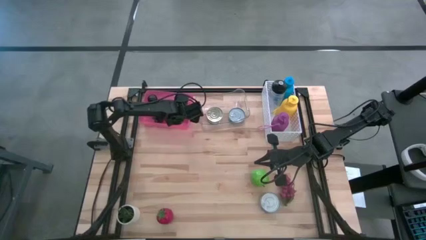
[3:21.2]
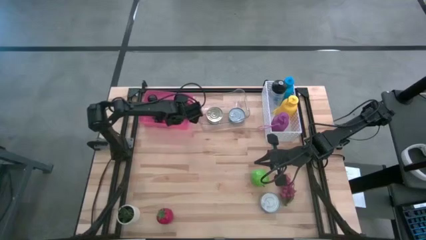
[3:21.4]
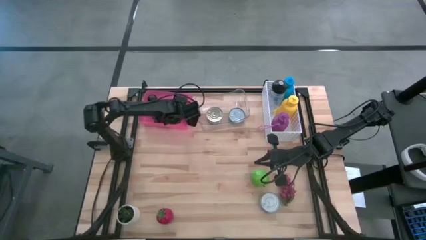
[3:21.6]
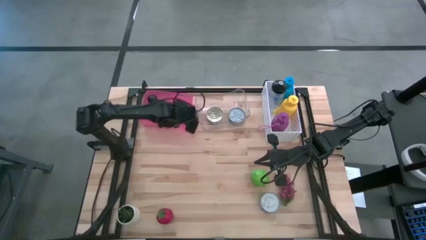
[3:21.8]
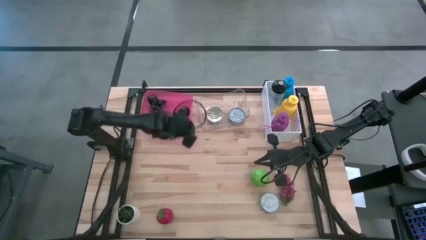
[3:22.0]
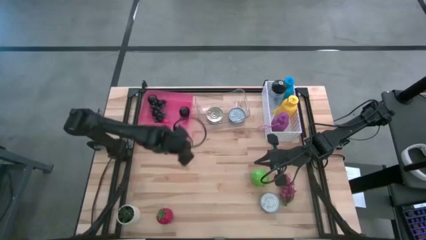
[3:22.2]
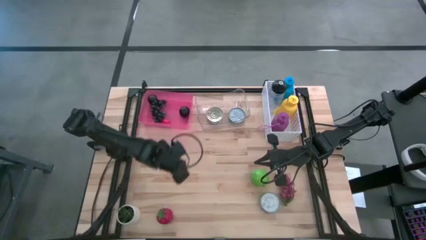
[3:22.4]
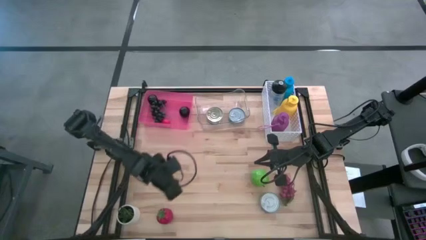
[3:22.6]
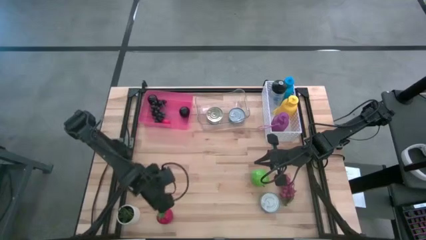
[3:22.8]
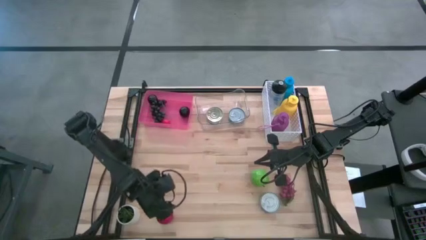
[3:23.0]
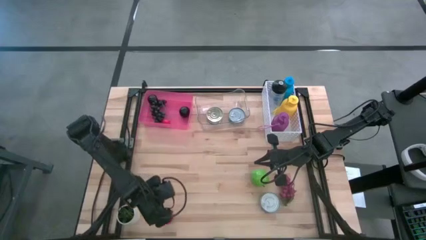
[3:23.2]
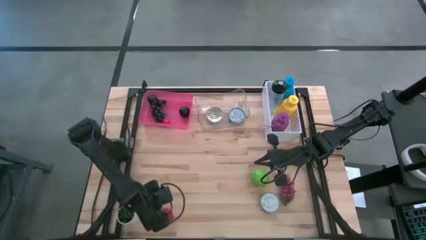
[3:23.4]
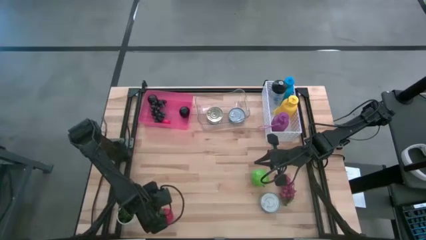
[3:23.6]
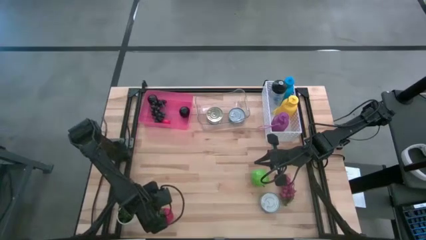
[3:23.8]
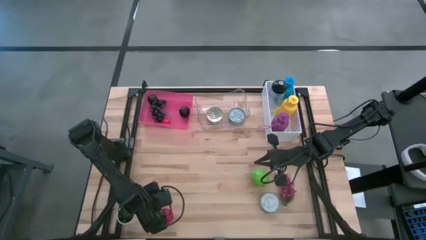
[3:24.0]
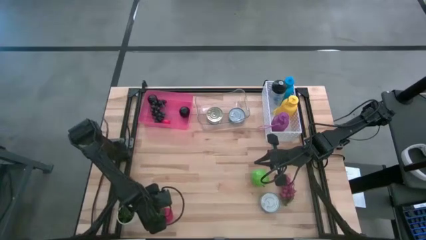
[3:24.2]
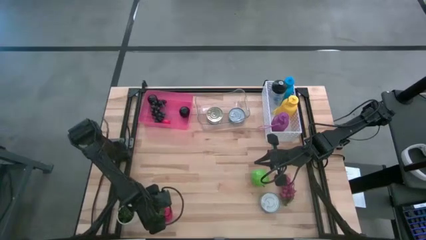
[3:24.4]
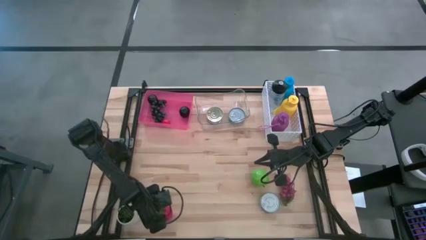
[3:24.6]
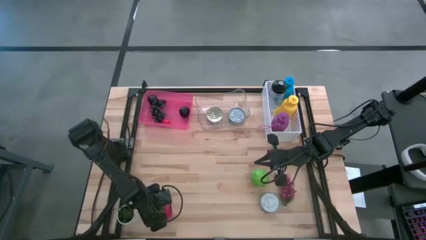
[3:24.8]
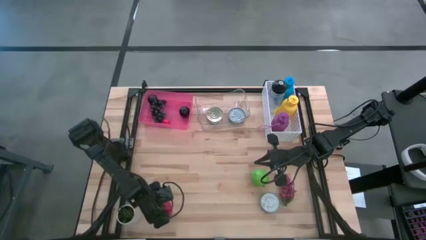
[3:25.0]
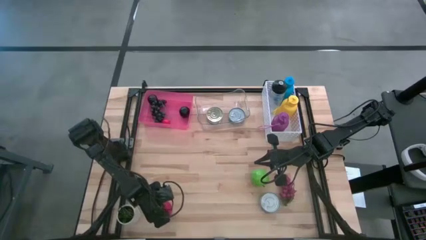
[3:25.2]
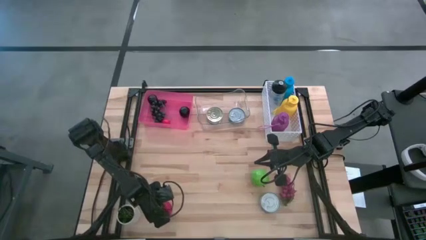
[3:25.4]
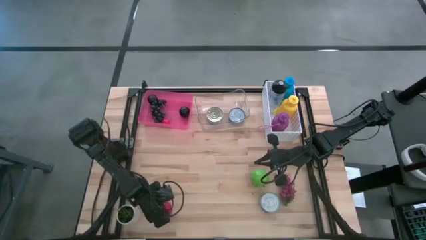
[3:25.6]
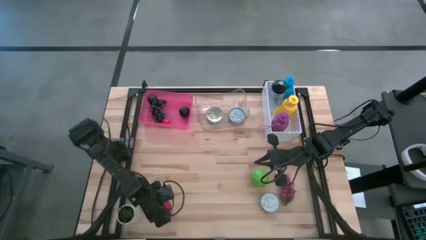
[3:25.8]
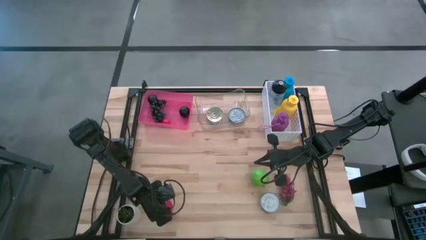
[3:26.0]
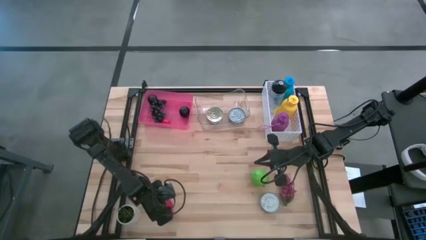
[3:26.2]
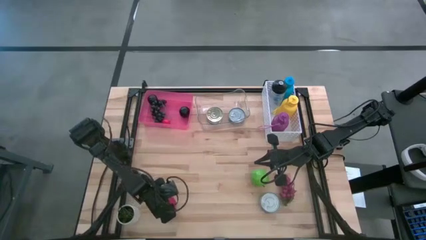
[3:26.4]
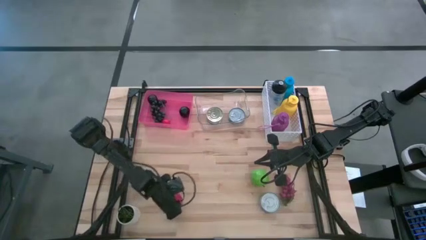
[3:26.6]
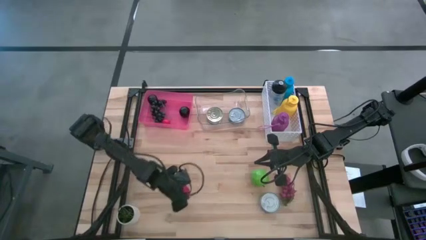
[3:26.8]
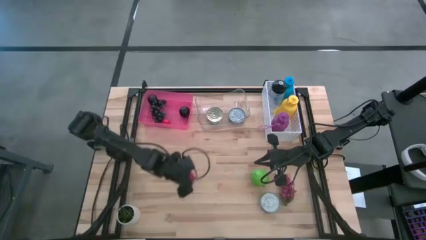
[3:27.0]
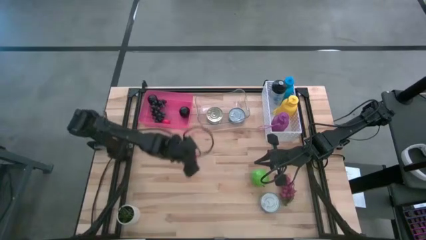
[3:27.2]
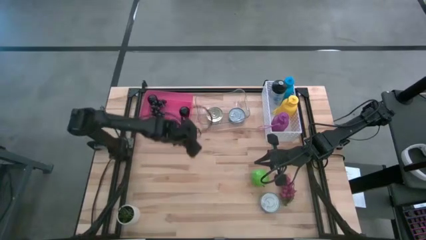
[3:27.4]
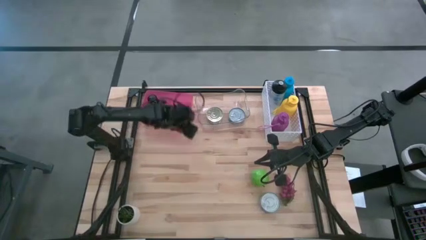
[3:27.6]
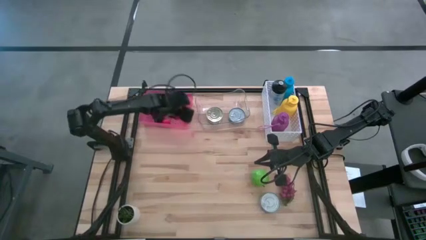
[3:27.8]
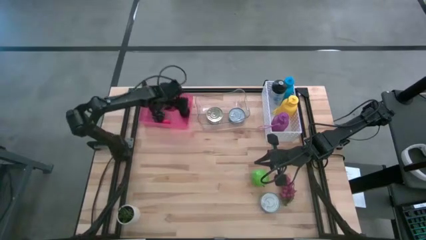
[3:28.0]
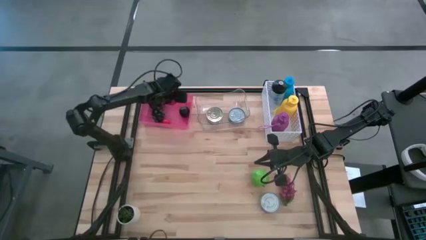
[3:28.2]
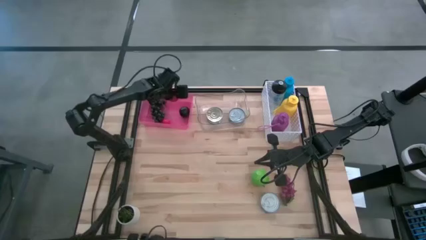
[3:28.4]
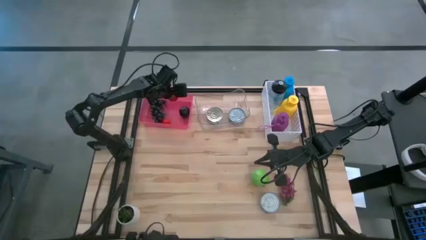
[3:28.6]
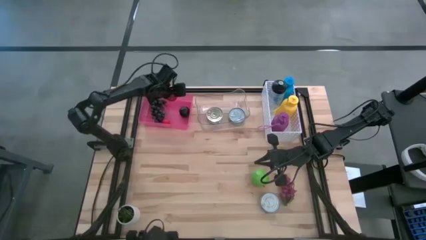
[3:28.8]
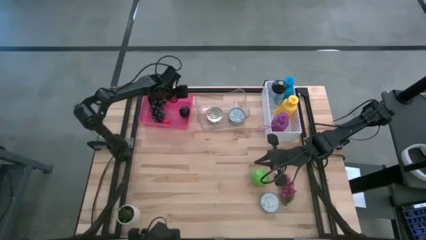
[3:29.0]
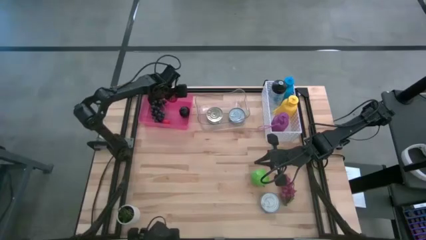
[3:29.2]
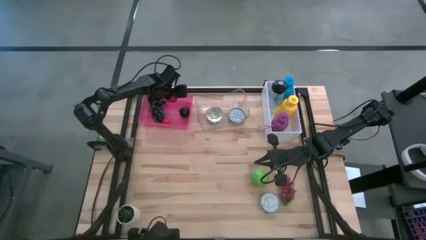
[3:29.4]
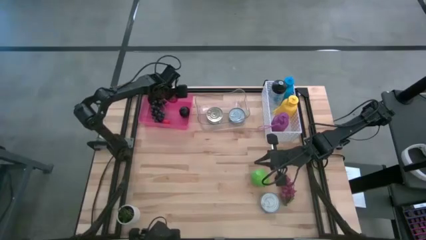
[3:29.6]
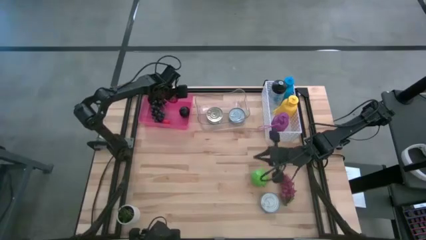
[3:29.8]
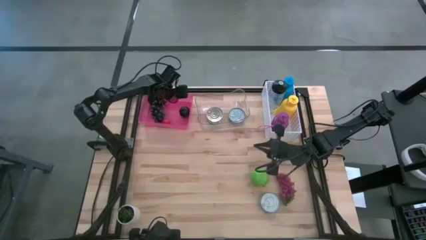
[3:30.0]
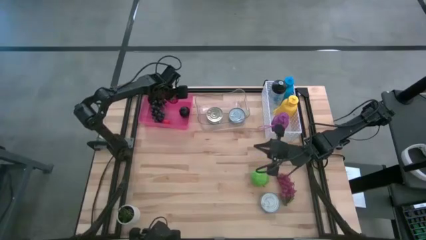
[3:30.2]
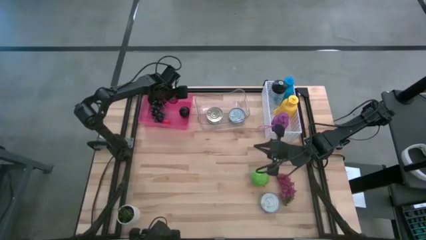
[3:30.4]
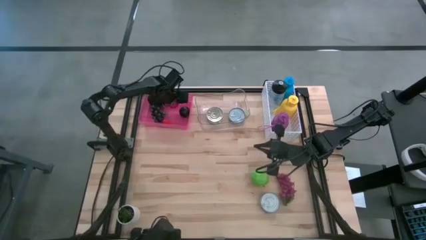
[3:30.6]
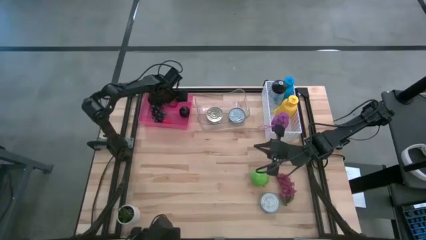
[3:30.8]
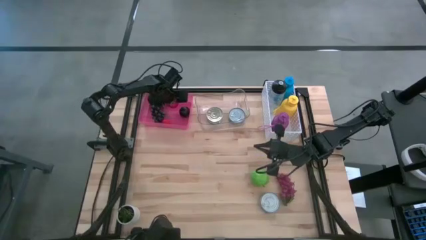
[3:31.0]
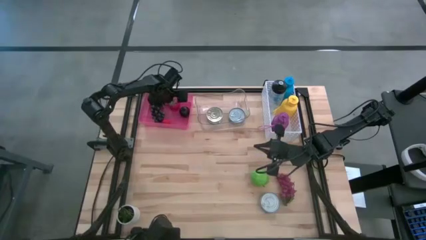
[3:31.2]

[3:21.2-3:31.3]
Task: Pick & Place Food Item
Put the tomato into the pink bin
